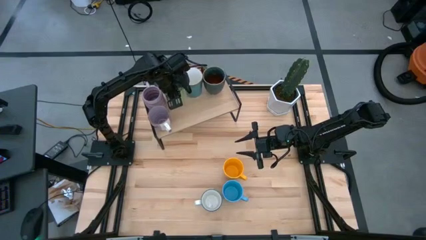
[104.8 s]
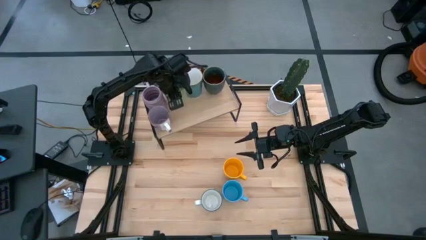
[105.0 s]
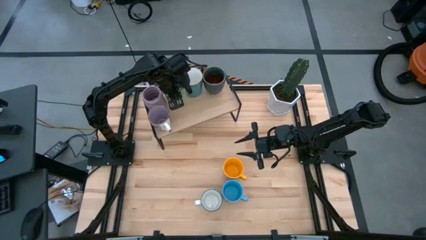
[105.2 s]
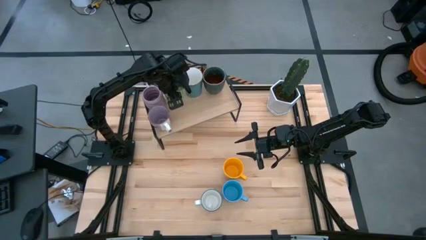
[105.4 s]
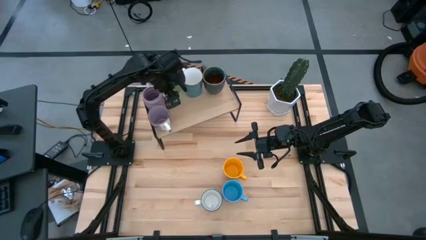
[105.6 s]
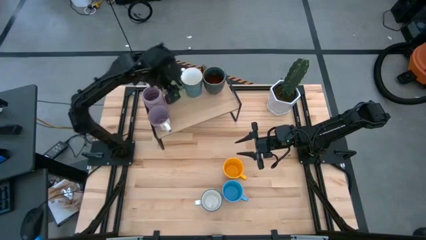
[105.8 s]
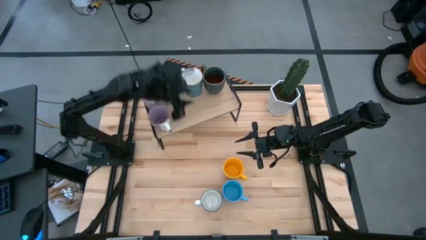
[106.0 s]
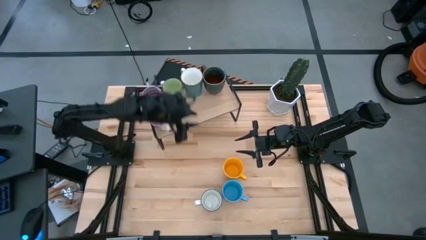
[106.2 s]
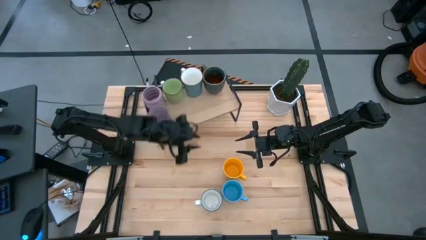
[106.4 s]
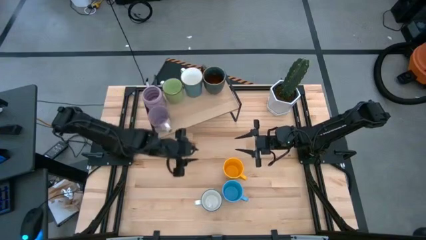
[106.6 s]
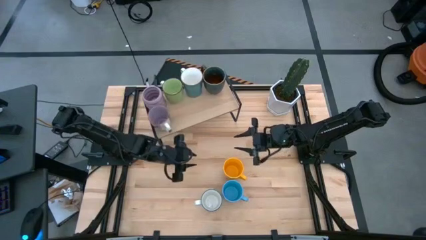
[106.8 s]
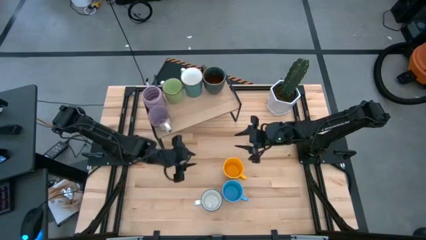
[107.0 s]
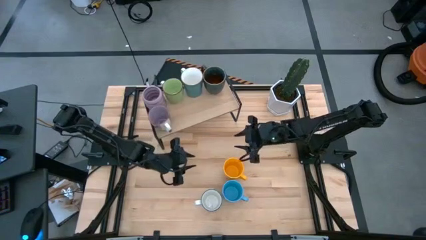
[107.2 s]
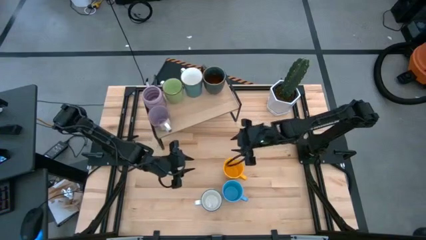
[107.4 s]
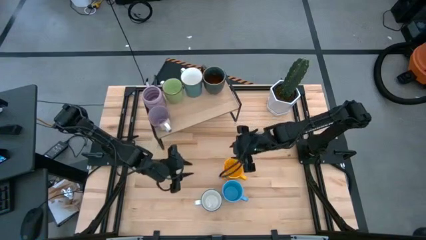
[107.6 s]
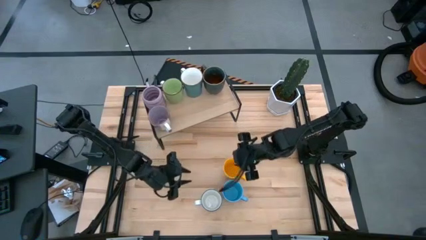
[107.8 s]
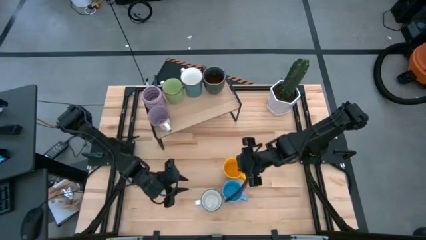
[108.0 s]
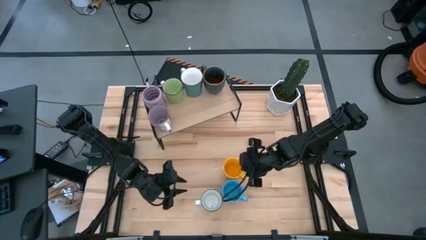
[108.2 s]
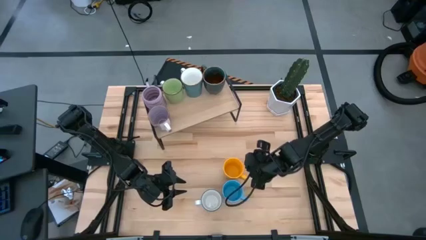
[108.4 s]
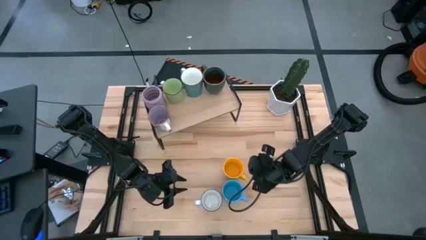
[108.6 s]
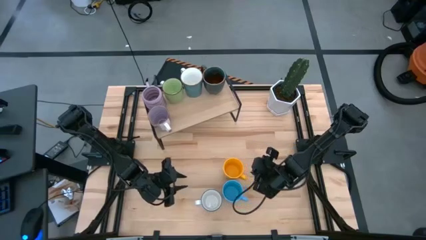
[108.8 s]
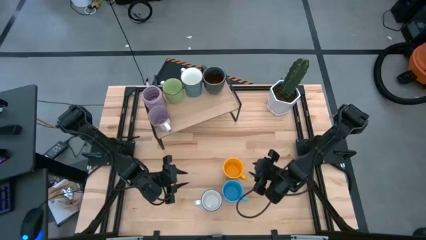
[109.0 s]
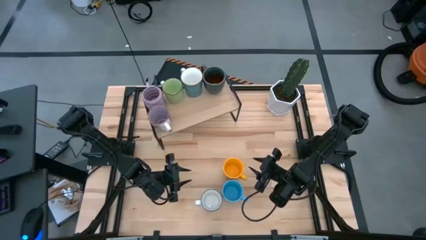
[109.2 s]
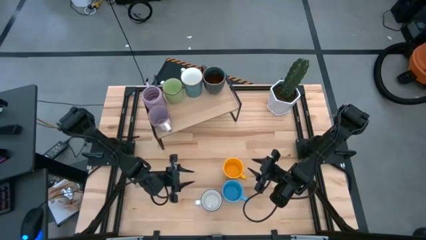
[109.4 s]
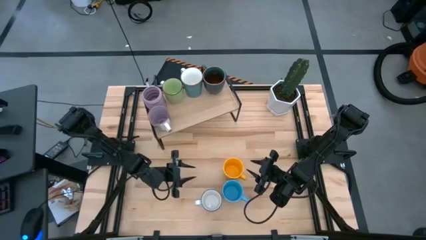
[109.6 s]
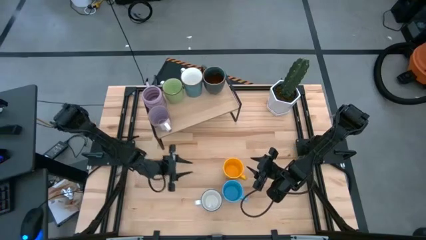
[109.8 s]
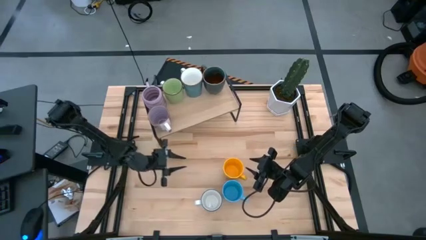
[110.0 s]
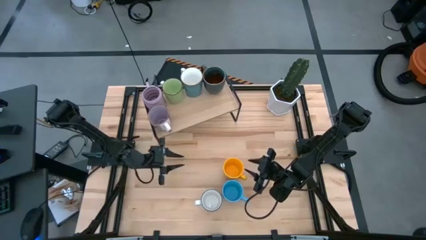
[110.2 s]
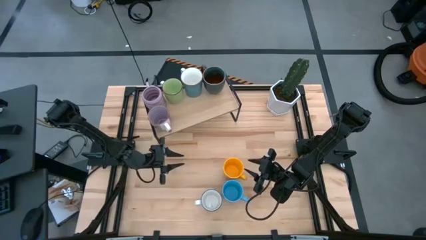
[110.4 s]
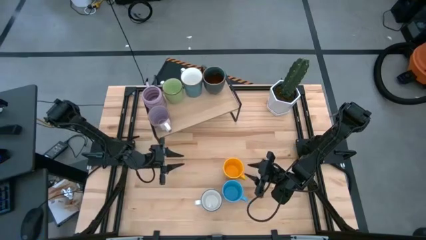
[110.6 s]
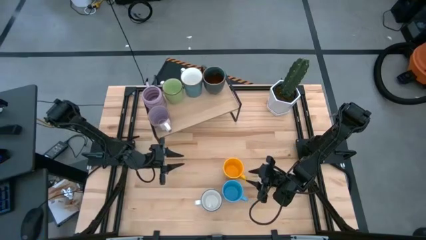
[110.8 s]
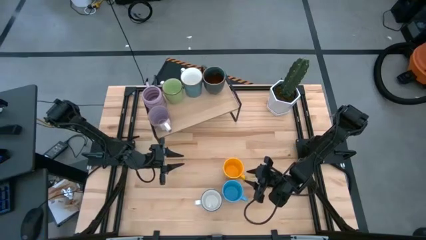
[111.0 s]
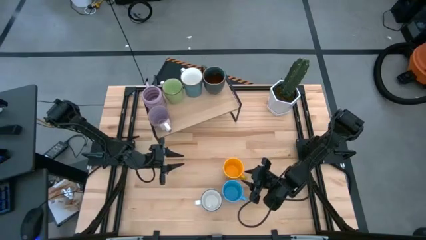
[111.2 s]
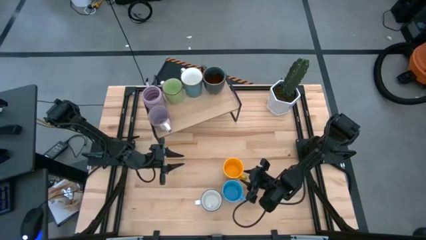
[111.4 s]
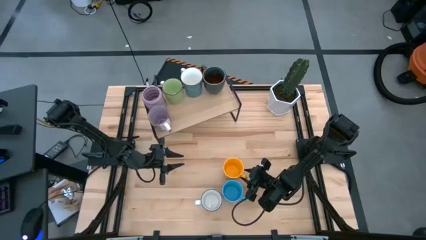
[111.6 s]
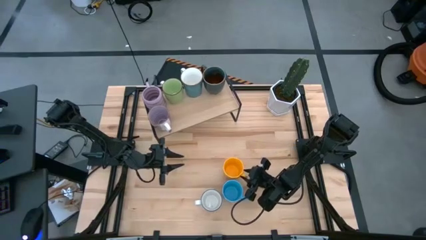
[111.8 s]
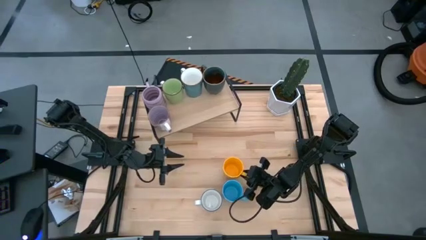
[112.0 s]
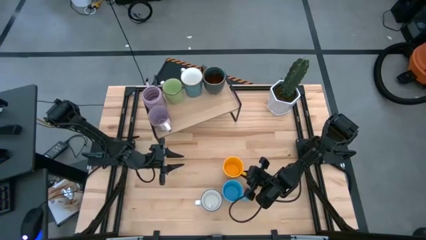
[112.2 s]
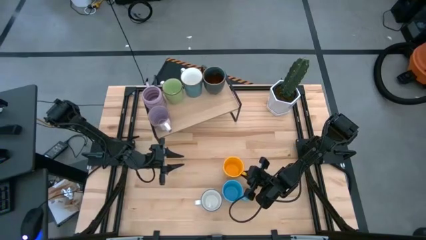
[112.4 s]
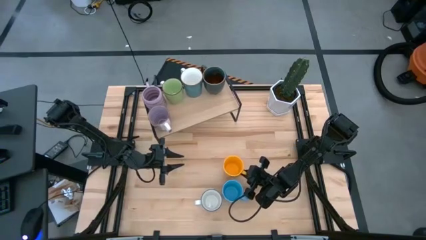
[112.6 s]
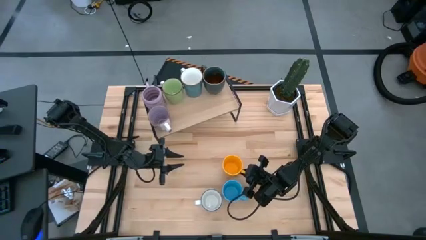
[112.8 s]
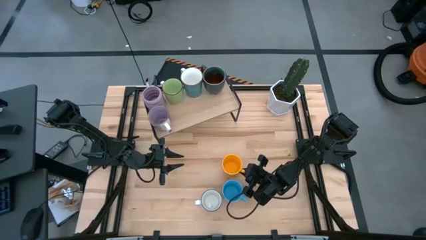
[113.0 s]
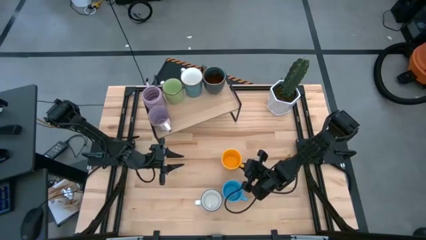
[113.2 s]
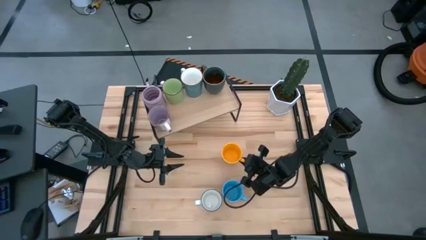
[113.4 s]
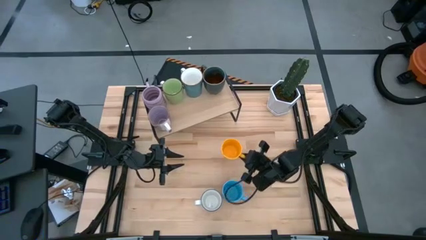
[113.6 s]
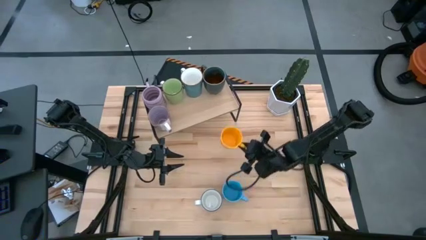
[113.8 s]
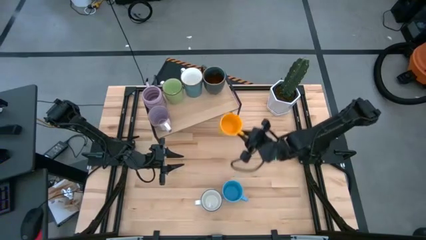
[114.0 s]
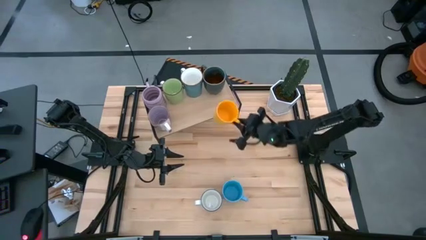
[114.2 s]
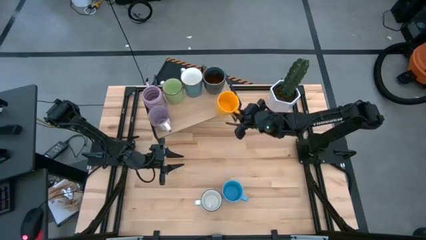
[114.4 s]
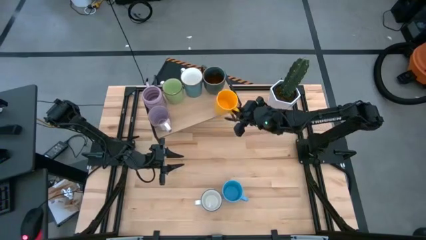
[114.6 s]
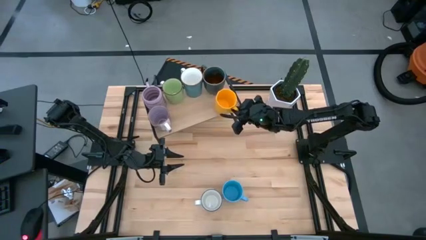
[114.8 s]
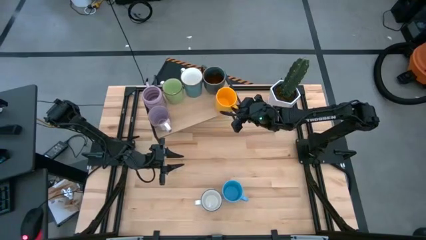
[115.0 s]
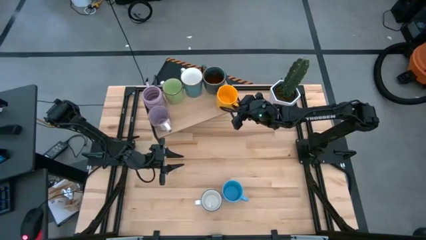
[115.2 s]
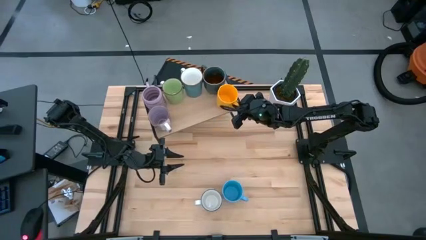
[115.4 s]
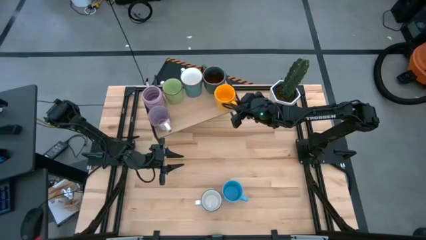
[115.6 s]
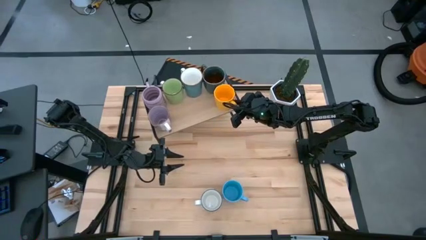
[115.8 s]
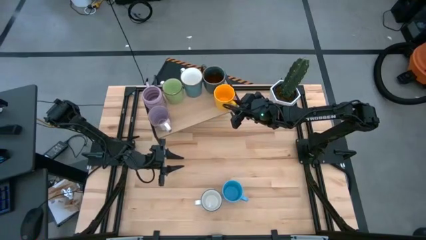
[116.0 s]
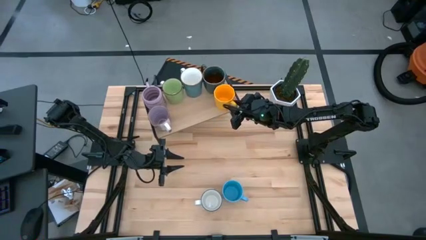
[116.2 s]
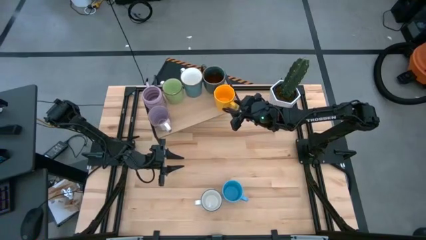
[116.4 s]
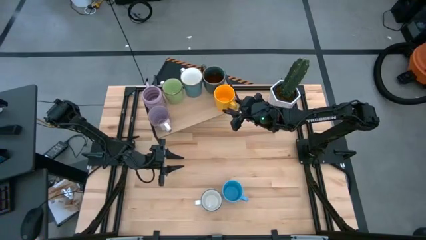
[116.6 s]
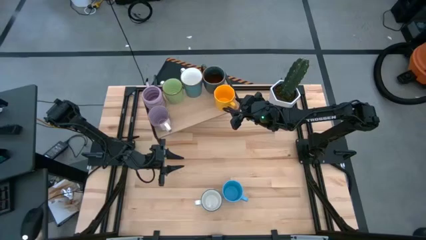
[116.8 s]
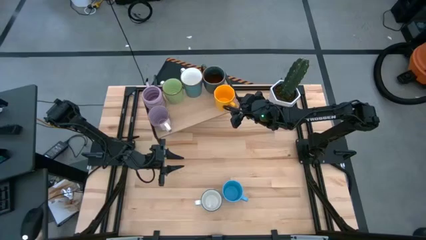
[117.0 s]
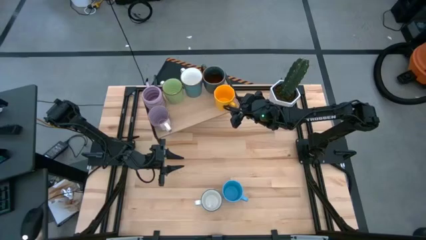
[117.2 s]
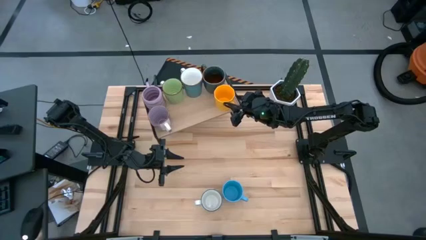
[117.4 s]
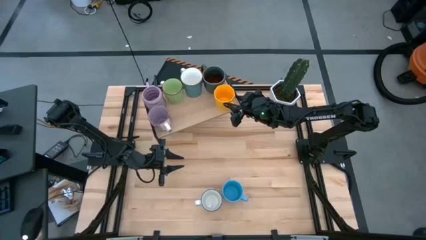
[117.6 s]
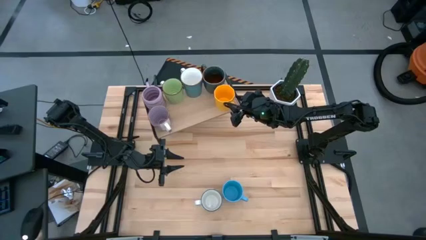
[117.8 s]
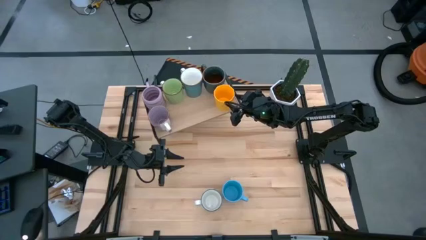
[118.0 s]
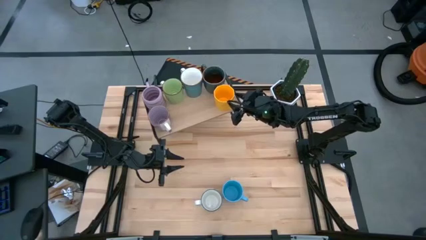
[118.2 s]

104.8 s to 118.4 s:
Task: Place coffee mugs
Put the yellow mug on the shelf
